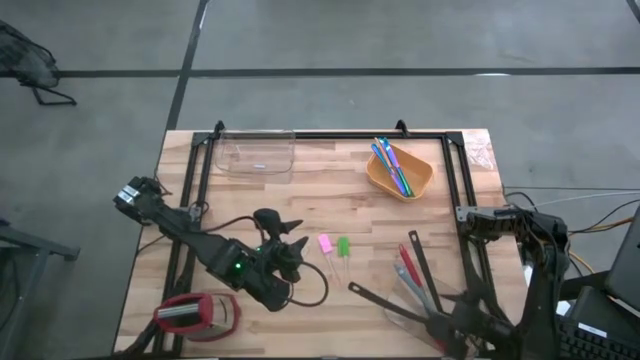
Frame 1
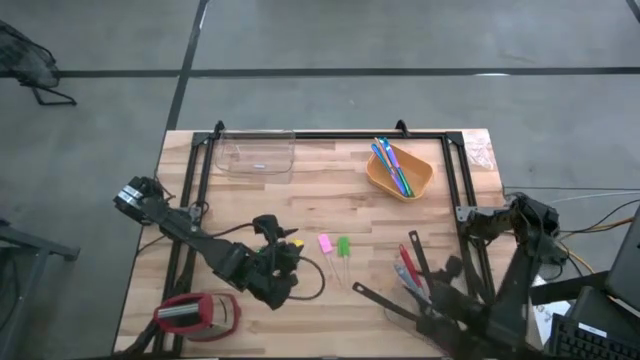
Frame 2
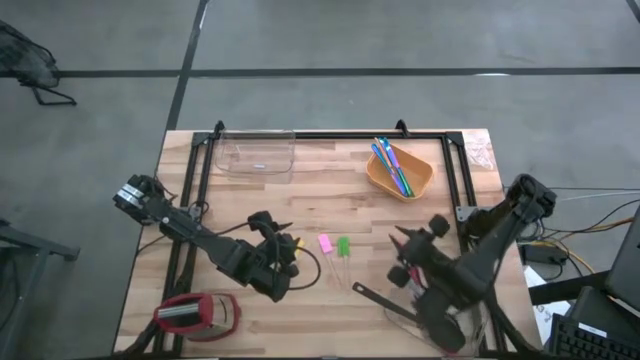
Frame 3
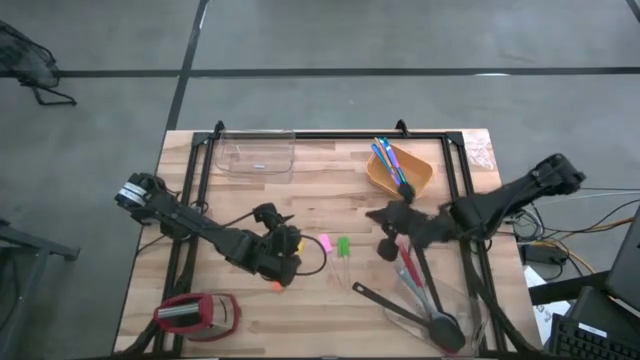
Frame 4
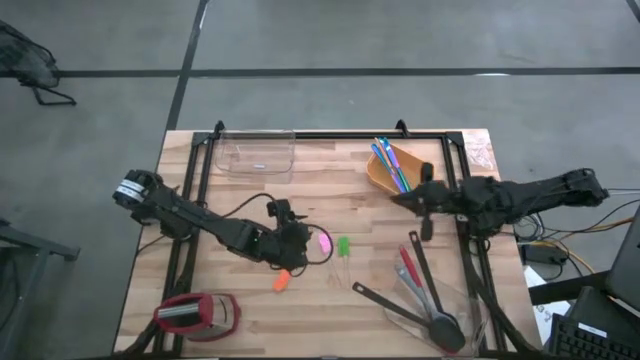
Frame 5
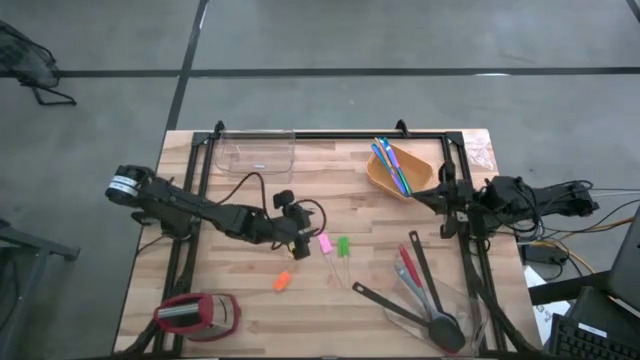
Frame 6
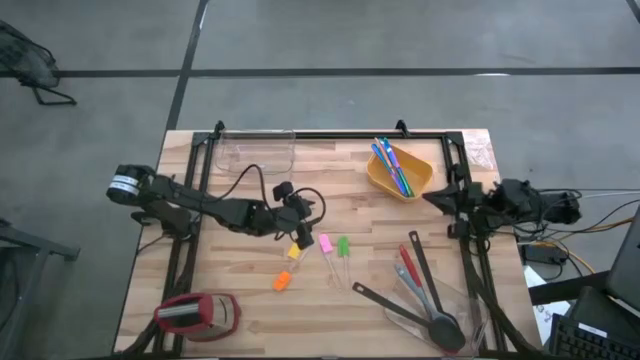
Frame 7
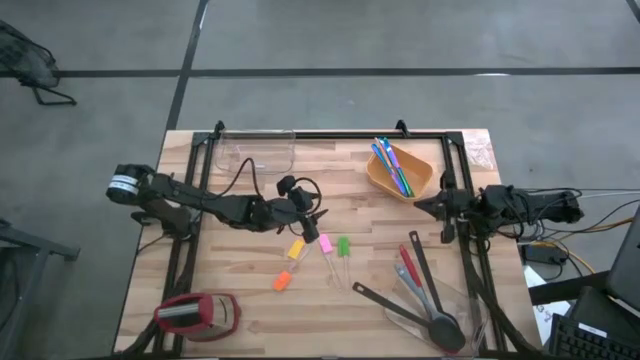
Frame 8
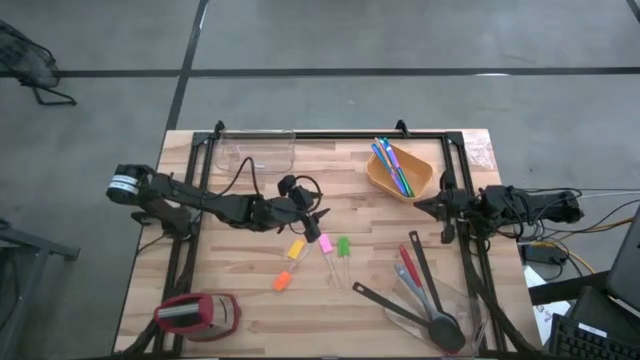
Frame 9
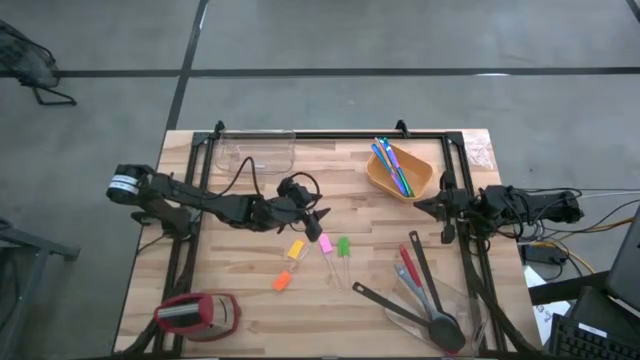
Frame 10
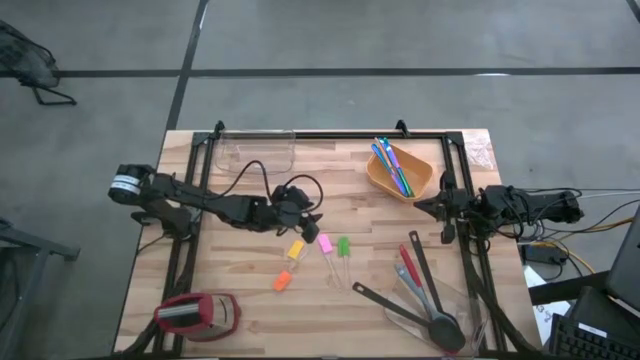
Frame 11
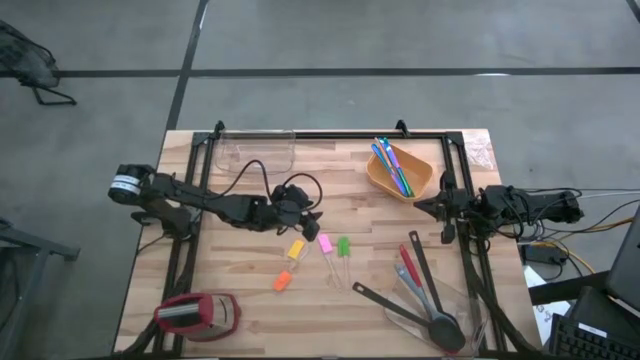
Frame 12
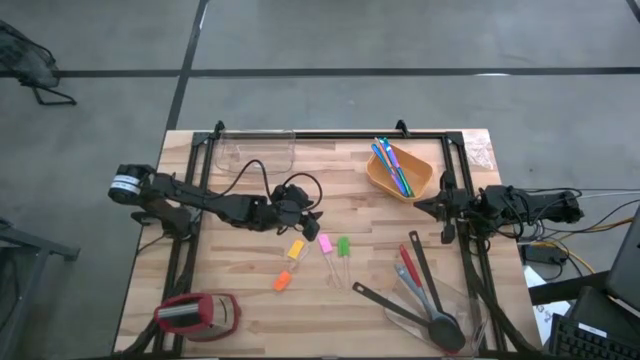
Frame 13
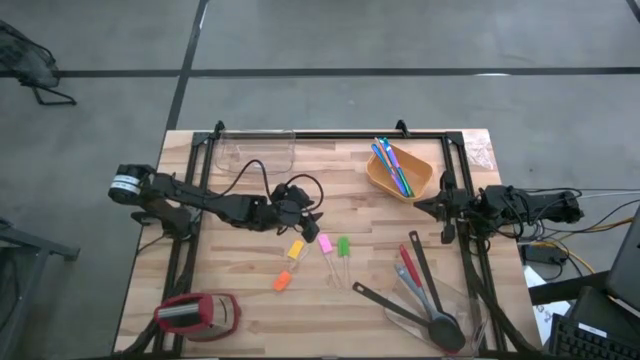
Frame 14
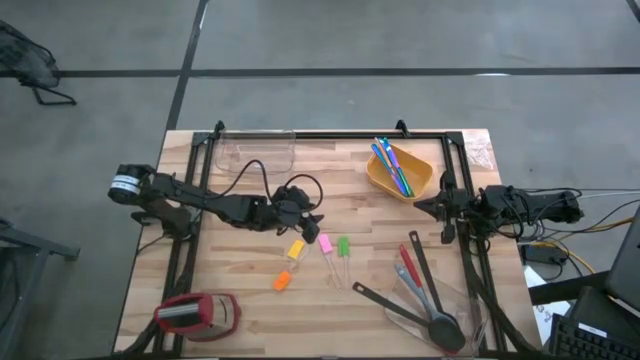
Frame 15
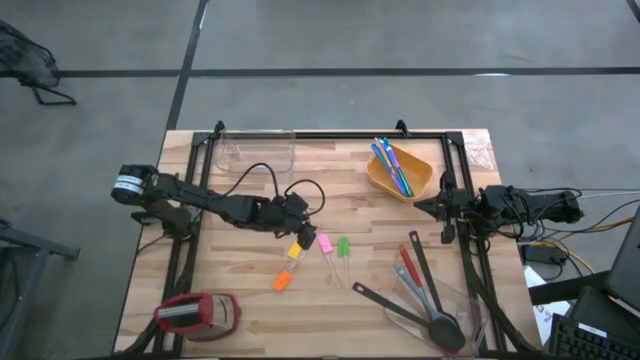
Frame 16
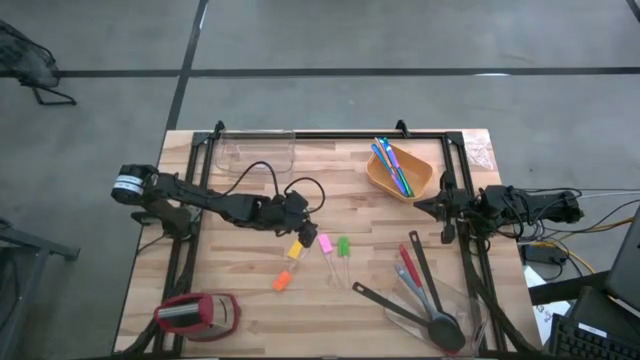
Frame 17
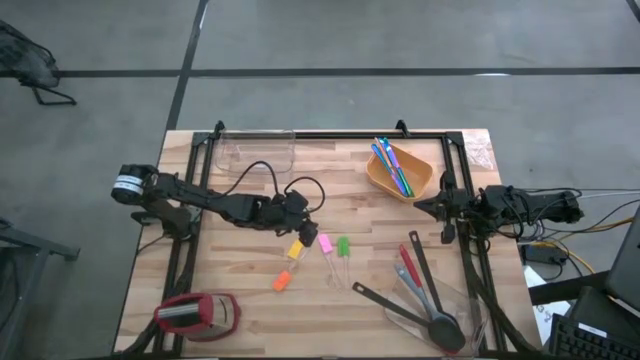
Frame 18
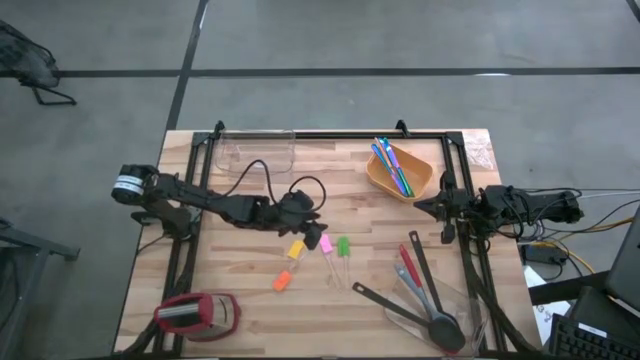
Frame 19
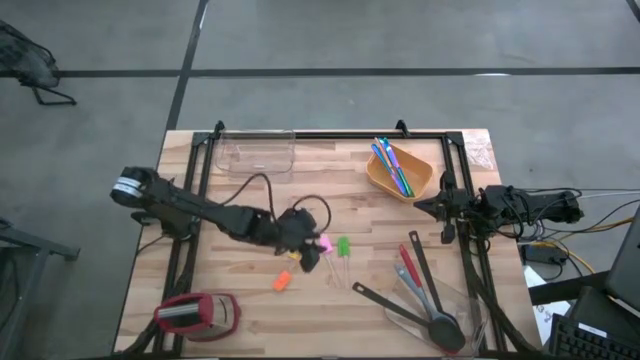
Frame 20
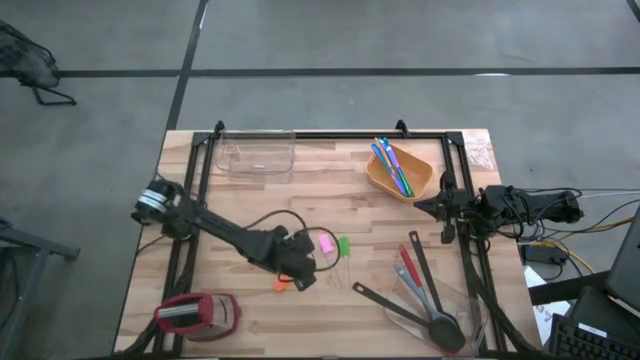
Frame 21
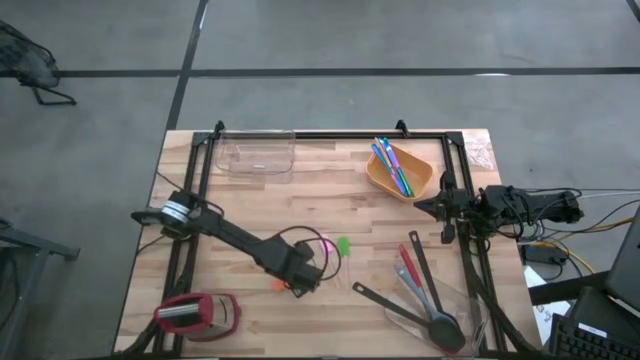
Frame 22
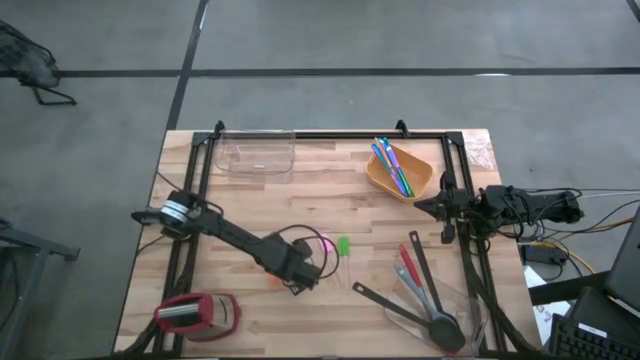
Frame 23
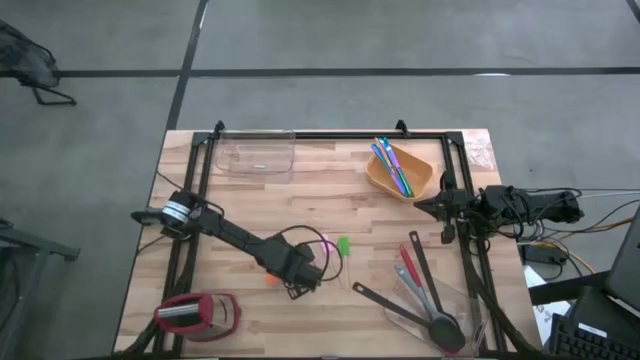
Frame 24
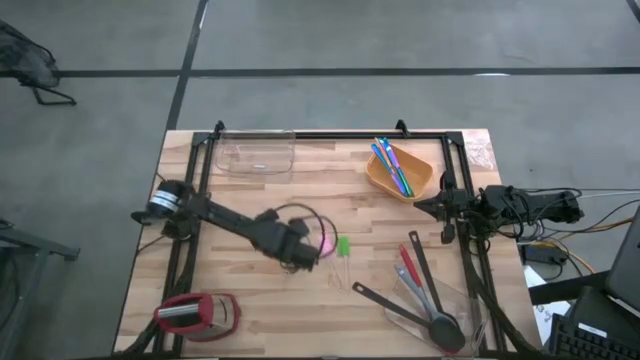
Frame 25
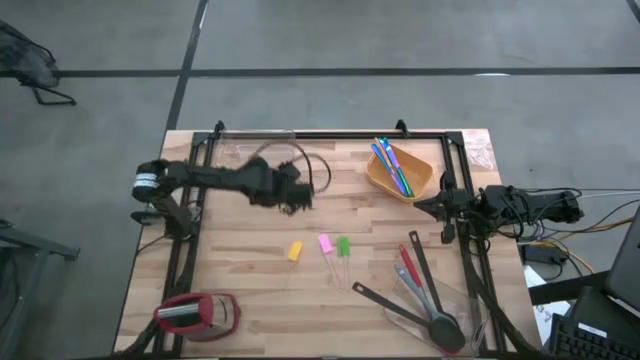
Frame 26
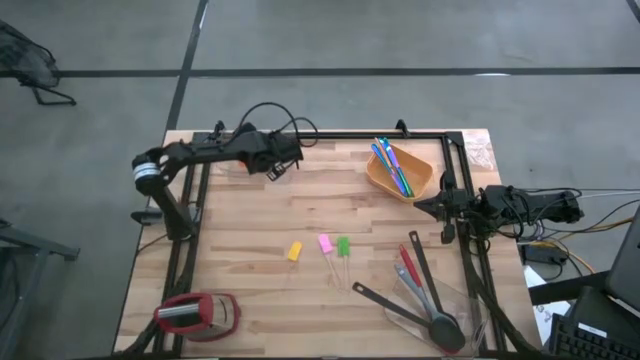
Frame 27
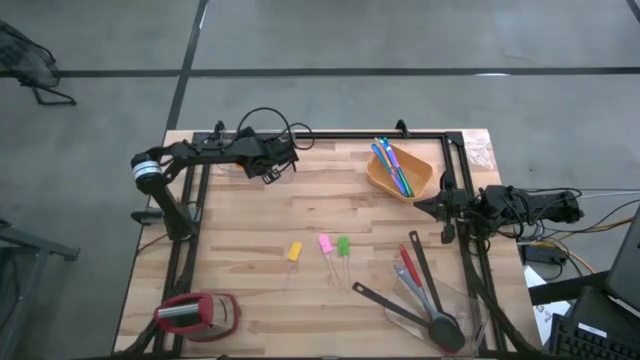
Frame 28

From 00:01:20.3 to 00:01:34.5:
Task: Pick & Place Kitchen Items
Put the orange spatula into the top transparent bin

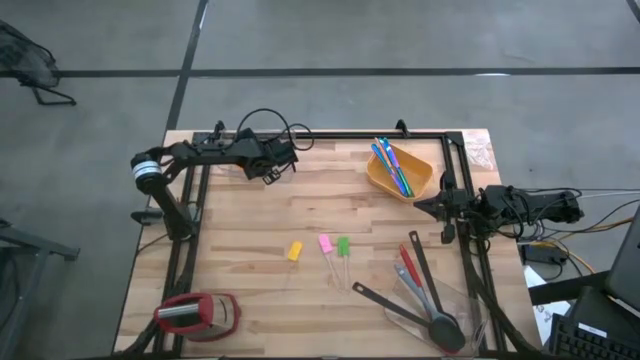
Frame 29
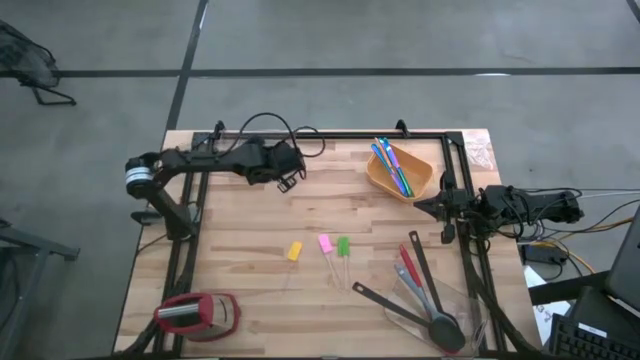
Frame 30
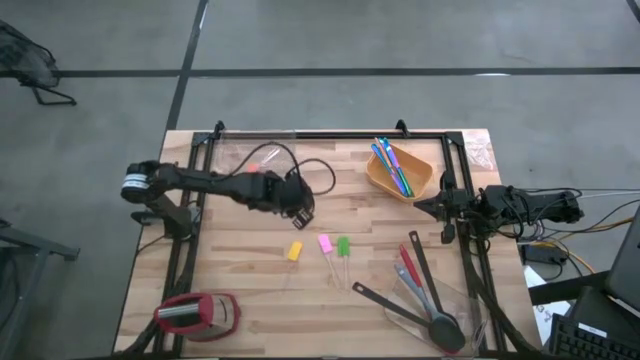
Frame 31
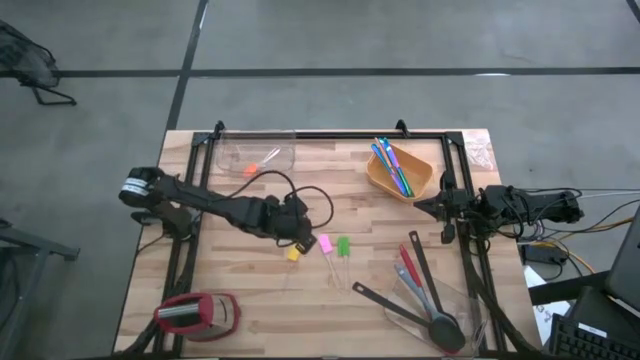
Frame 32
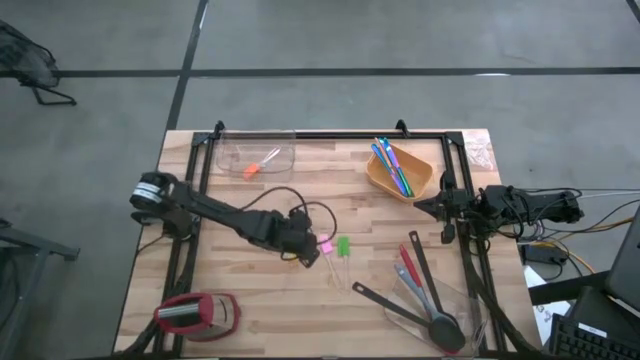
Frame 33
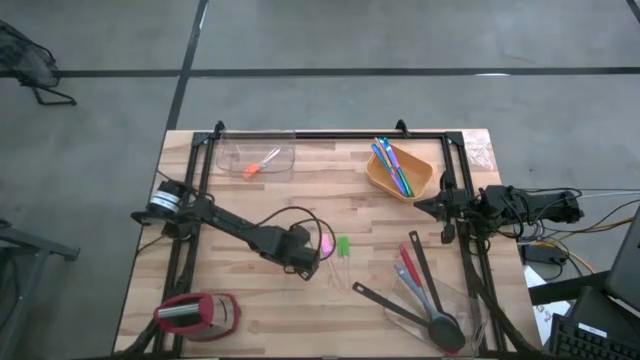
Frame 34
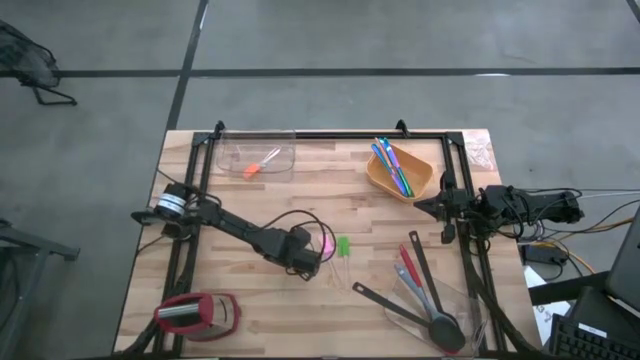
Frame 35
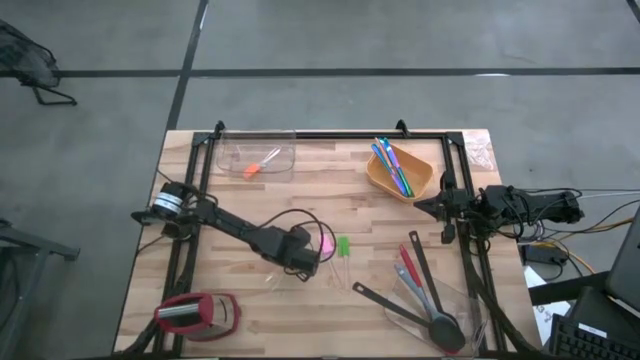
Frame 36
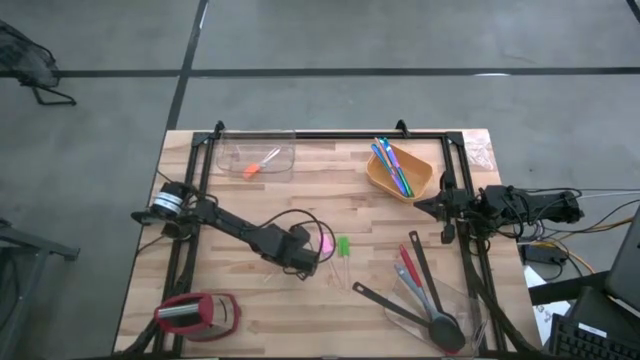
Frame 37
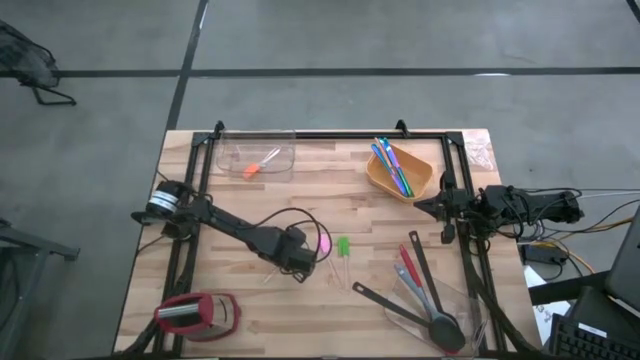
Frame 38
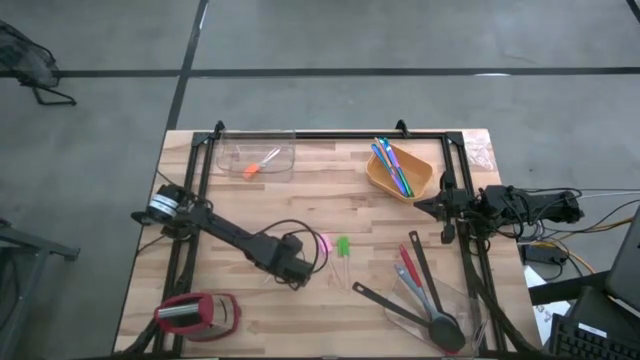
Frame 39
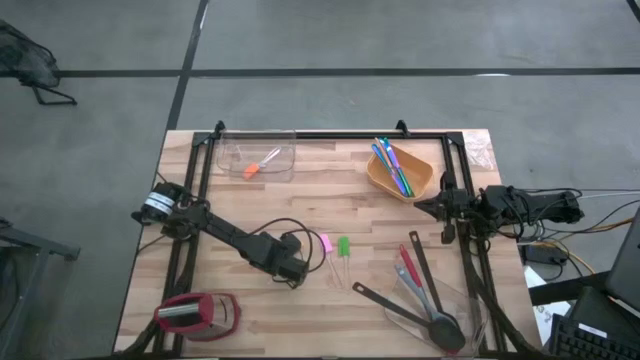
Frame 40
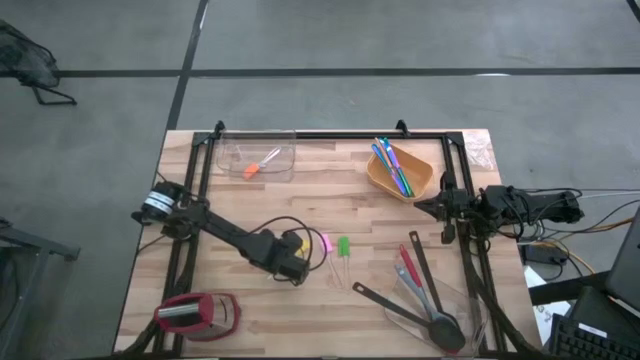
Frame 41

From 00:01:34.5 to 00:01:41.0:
Put the yellow spatula into the top transparent bin

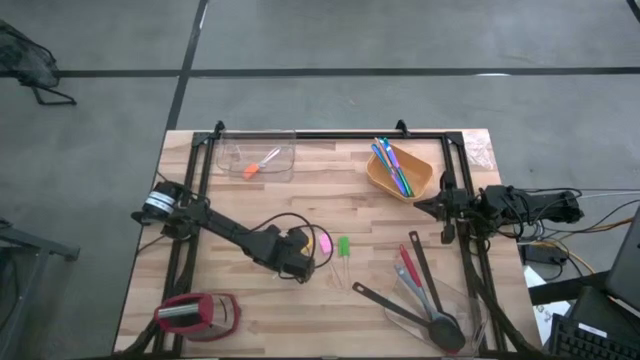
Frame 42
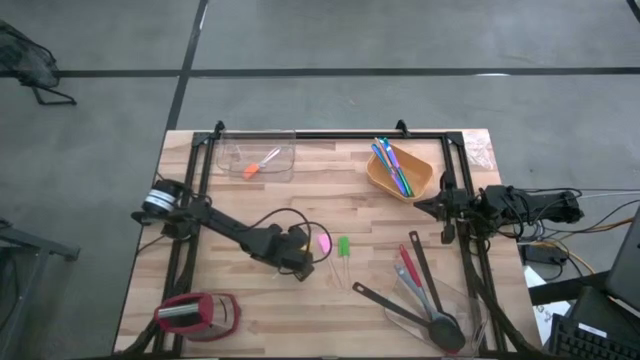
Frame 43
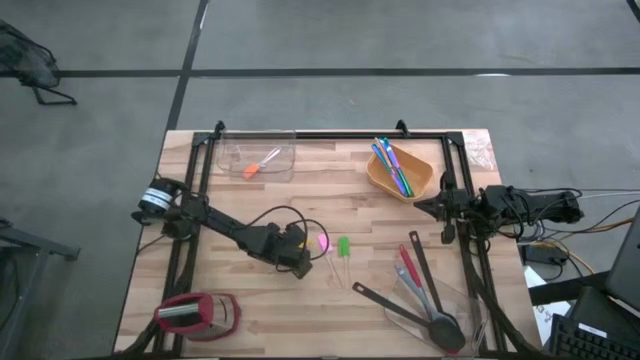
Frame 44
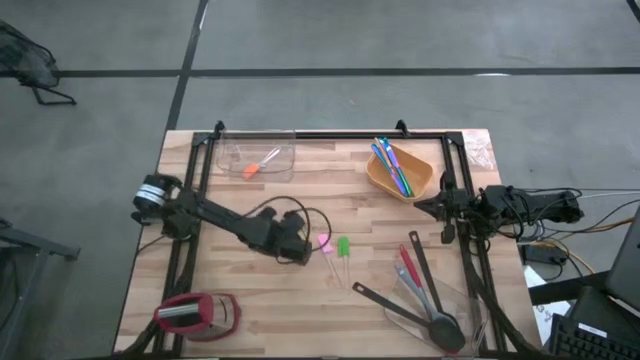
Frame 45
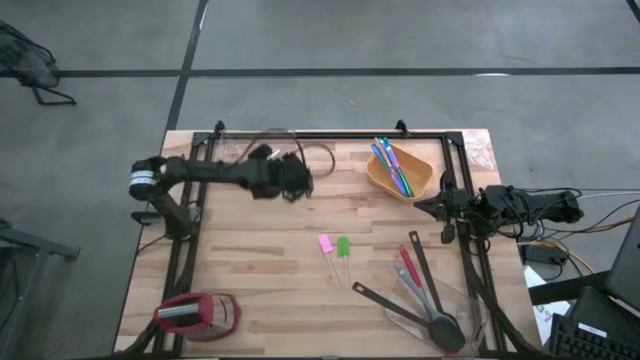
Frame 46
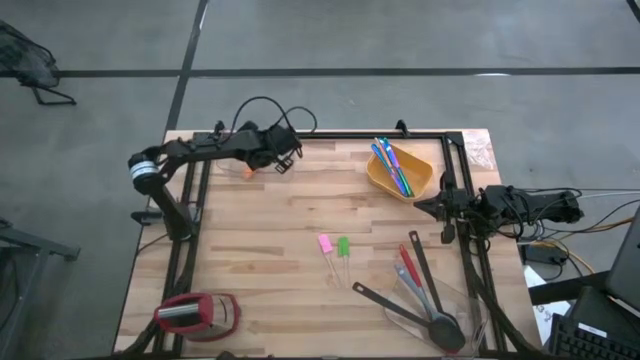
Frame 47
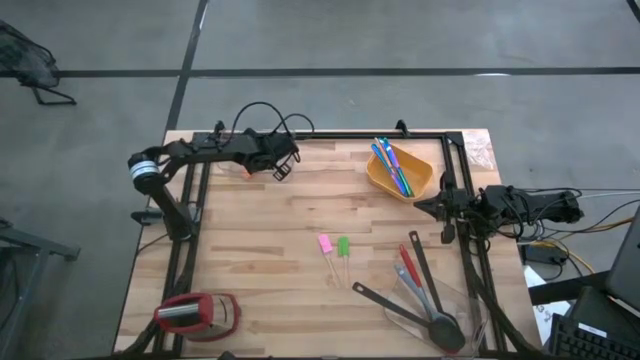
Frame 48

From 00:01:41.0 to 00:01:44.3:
Put the yellow spatula into the top transparent bin
